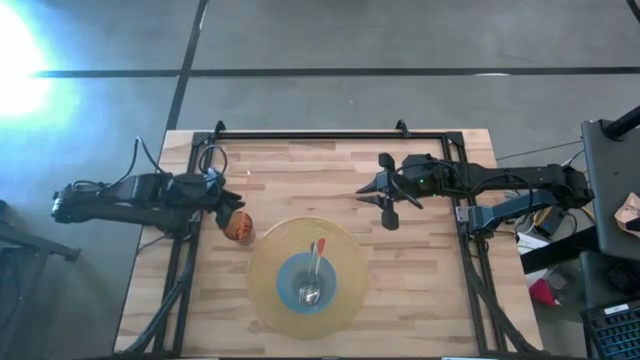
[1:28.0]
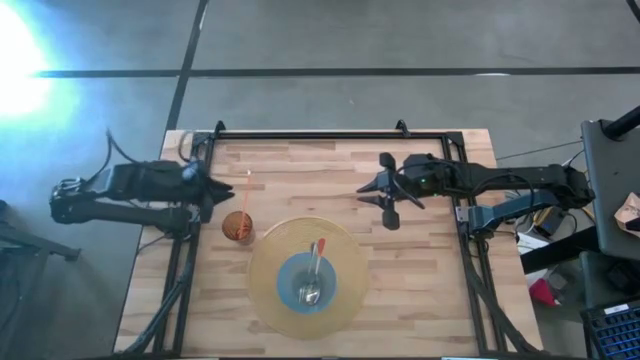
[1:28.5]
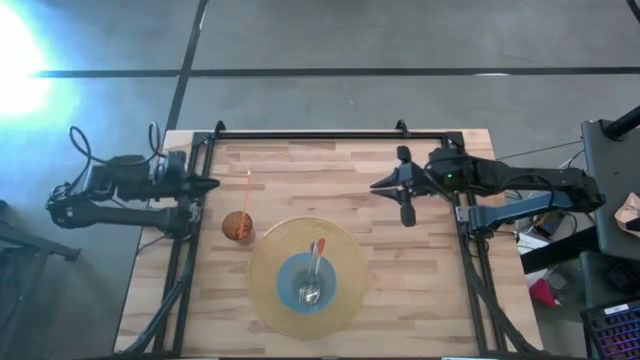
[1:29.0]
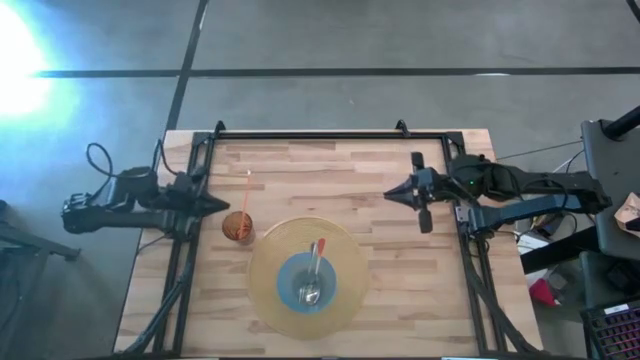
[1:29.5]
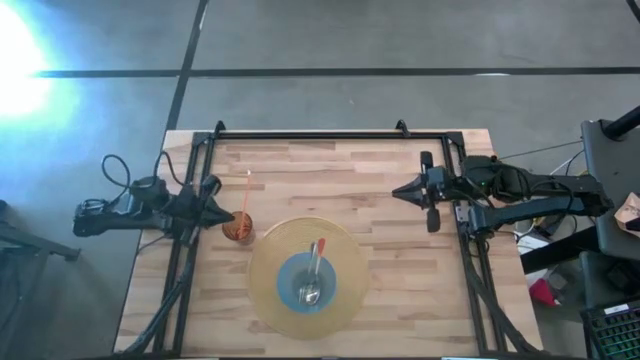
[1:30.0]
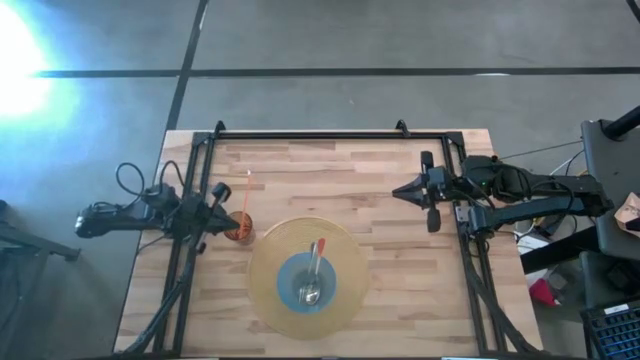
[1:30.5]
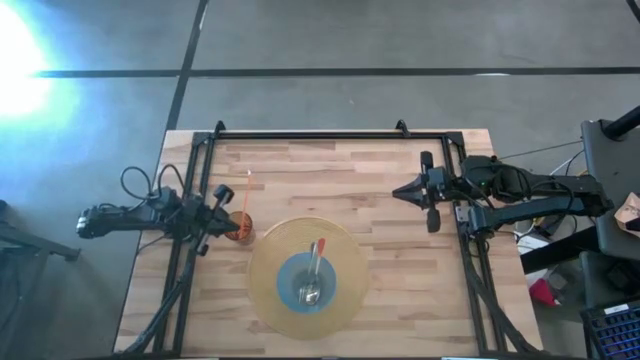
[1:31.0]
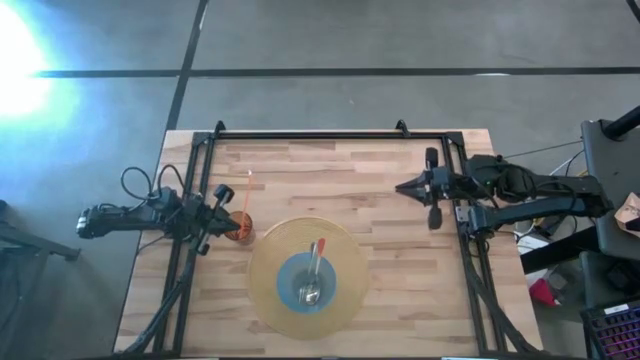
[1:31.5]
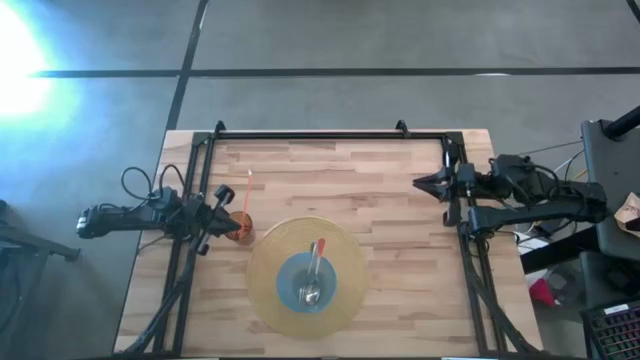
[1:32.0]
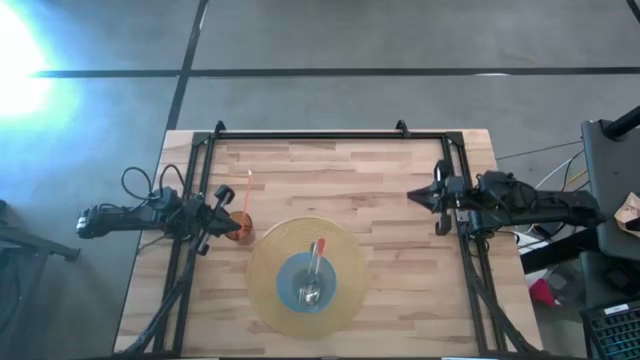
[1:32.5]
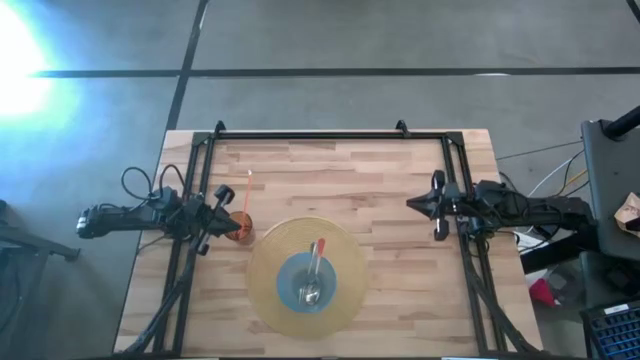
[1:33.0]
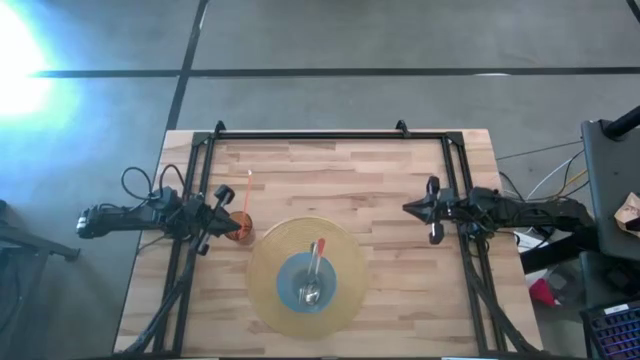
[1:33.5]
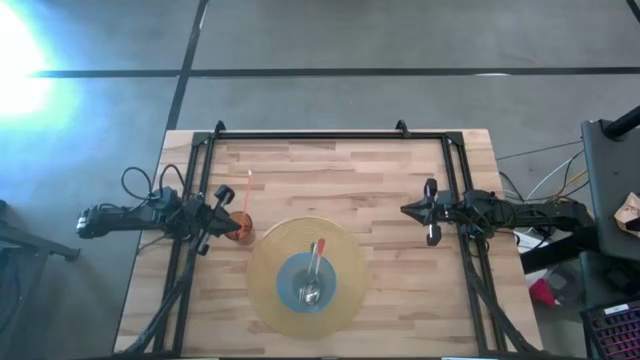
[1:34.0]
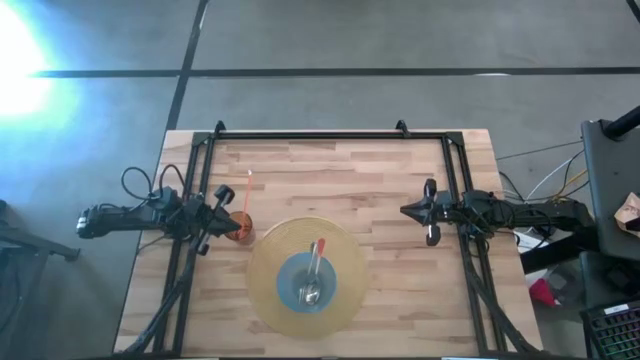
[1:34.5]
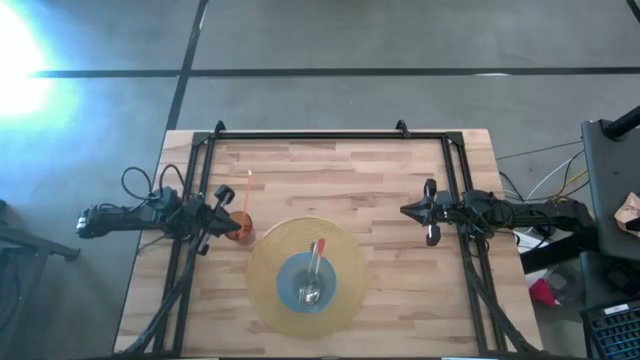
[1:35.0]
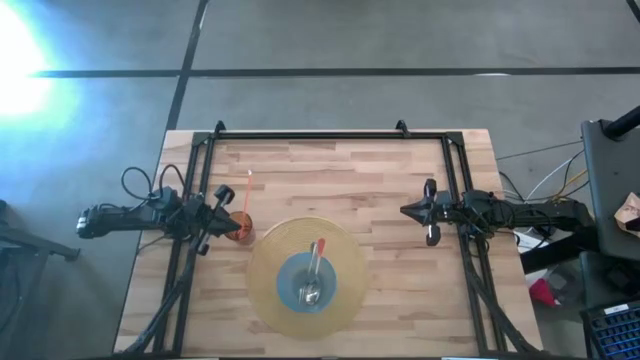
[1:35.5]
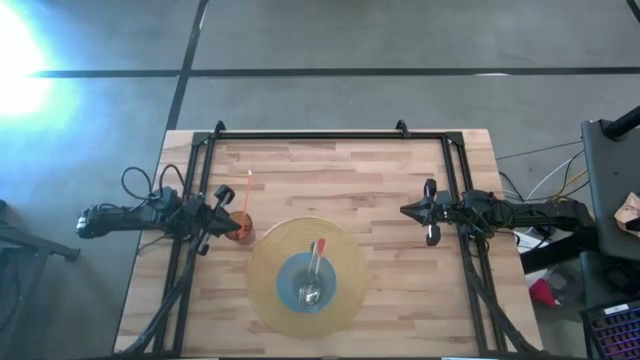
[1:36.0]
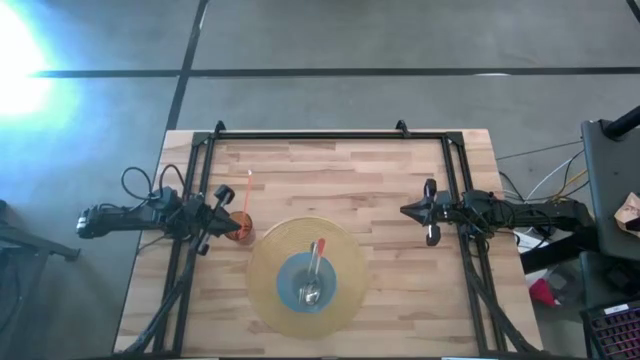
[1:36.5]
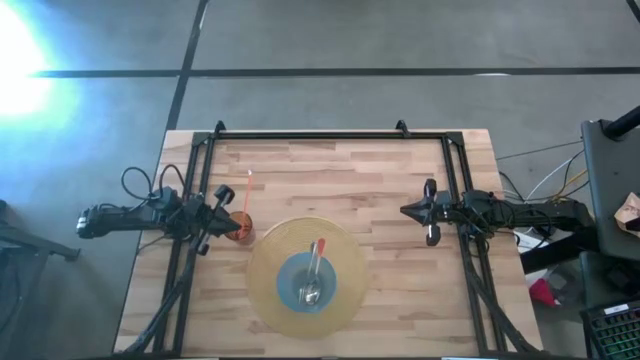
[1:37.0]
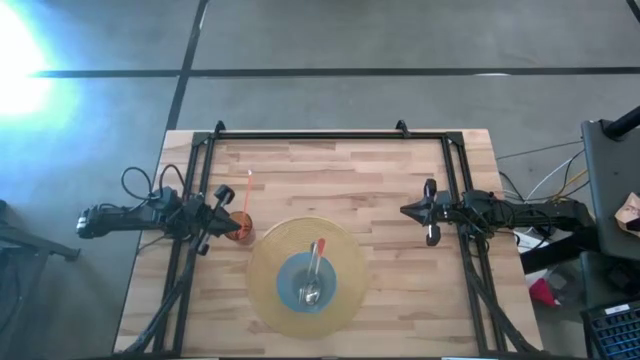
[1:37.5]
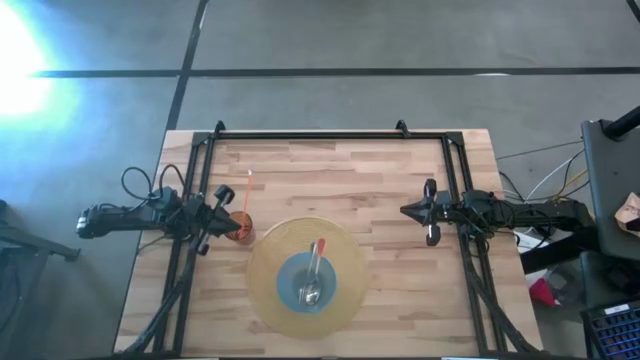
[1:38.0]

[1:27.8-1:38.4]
Task: Pick & Place Utensil
Return to Home Position

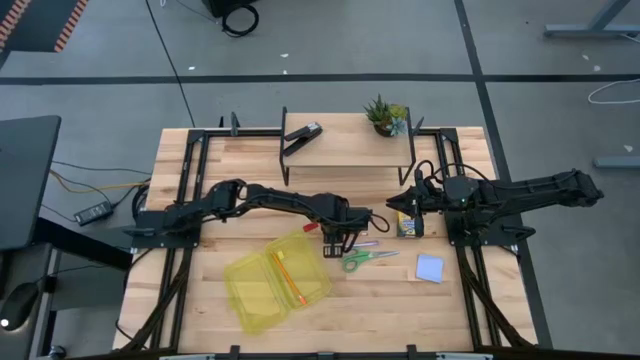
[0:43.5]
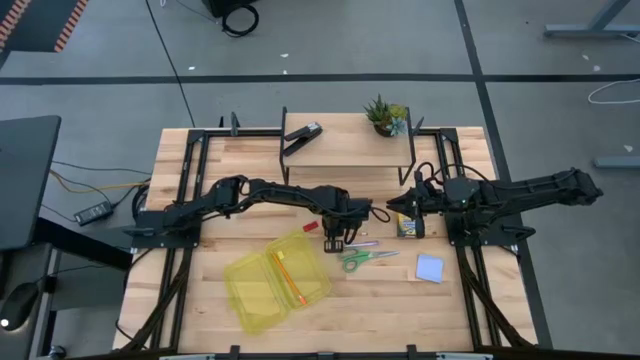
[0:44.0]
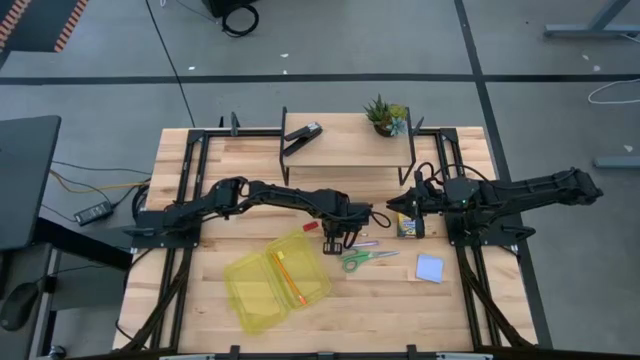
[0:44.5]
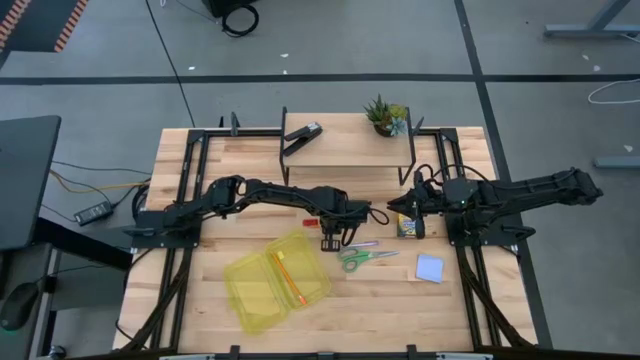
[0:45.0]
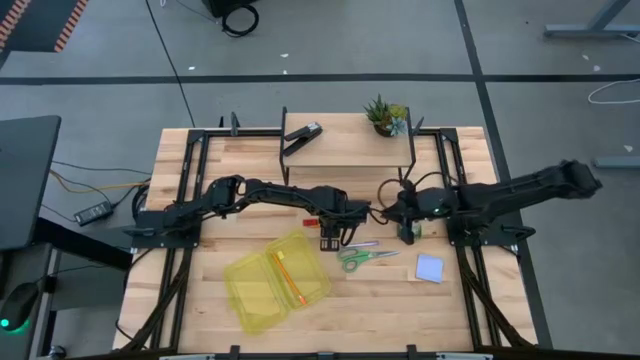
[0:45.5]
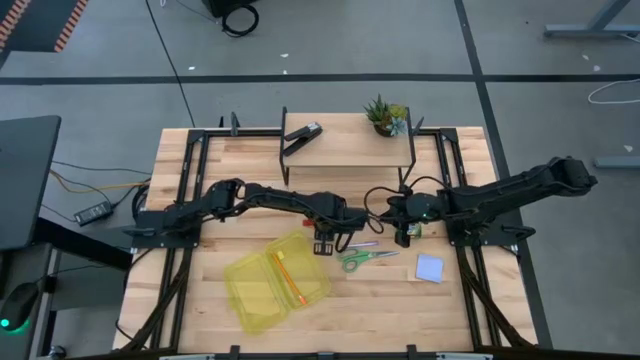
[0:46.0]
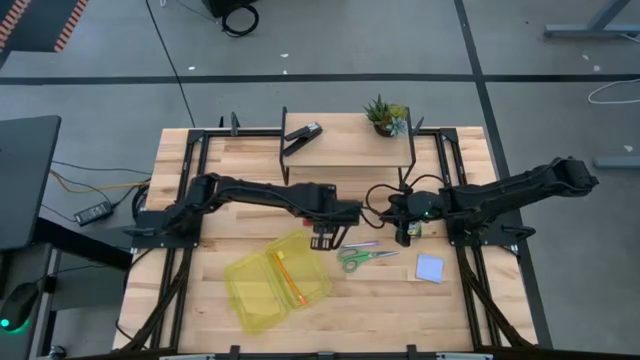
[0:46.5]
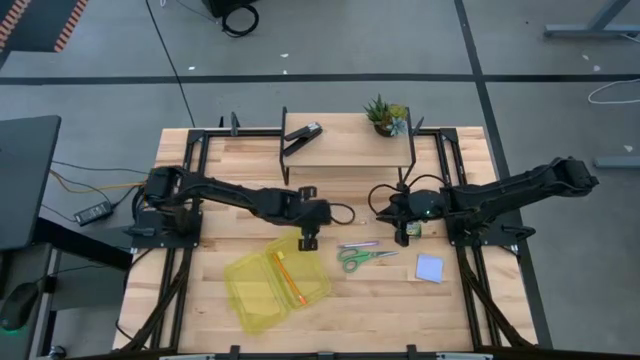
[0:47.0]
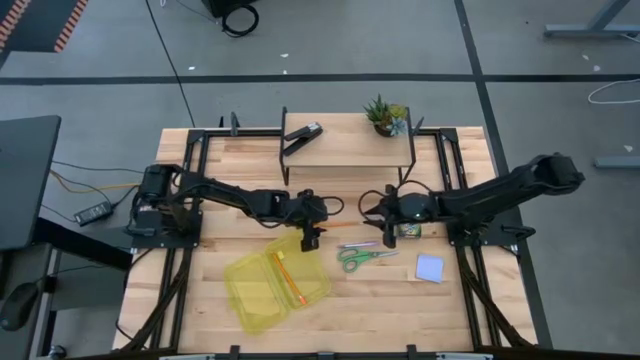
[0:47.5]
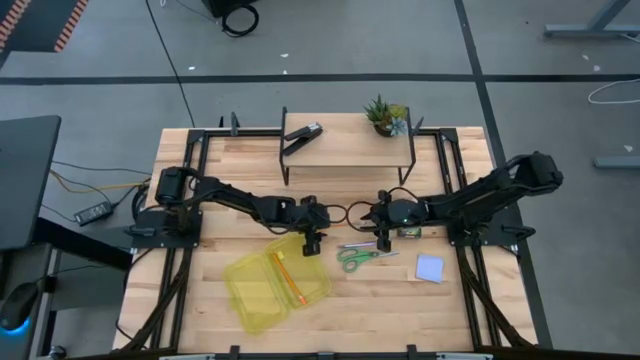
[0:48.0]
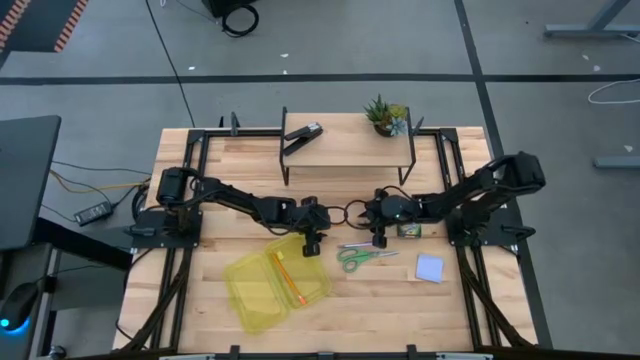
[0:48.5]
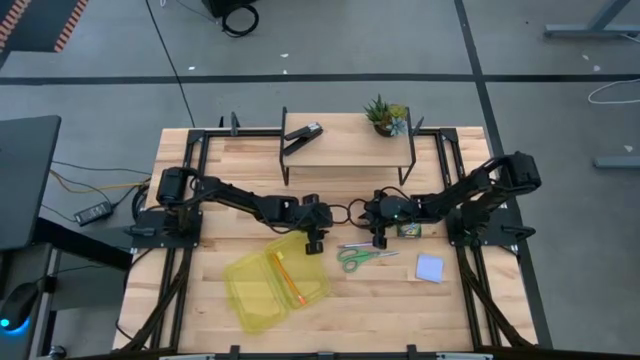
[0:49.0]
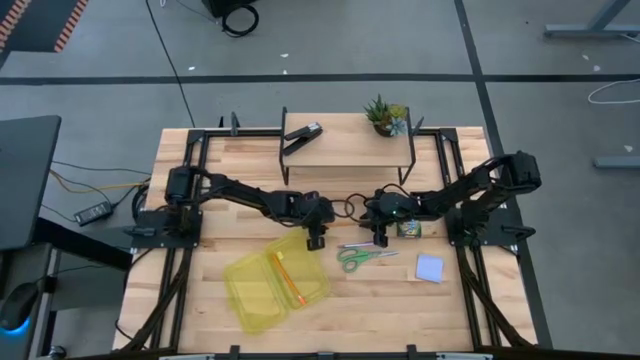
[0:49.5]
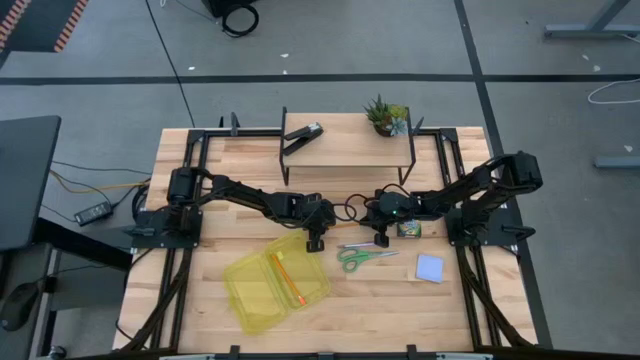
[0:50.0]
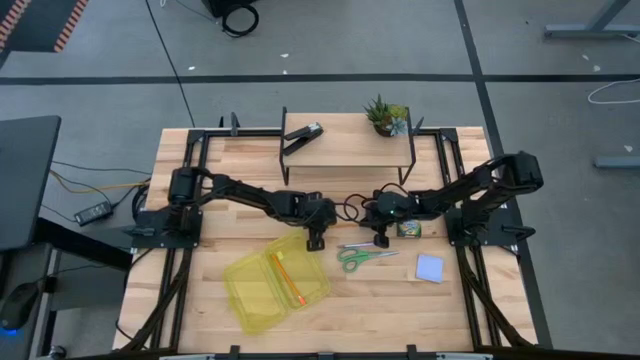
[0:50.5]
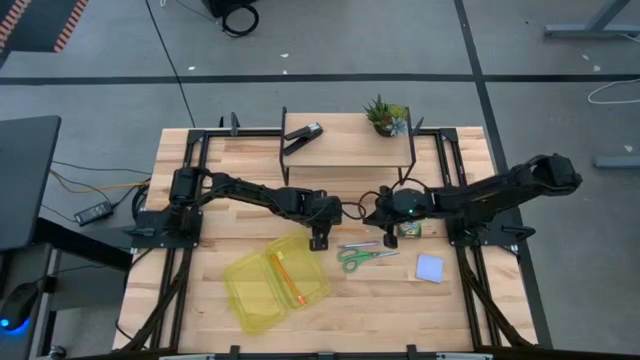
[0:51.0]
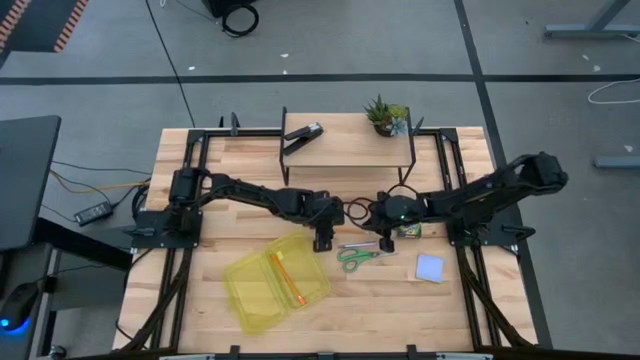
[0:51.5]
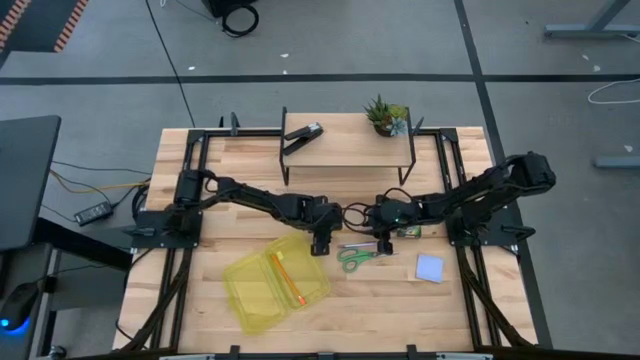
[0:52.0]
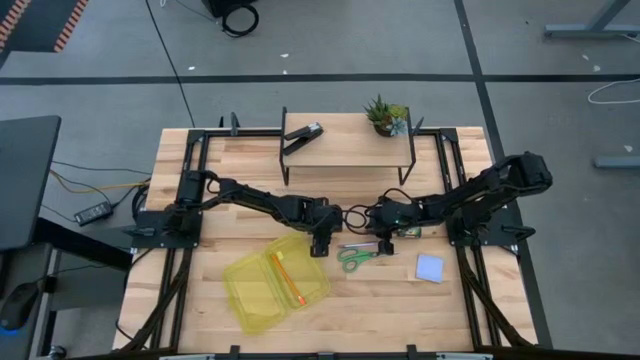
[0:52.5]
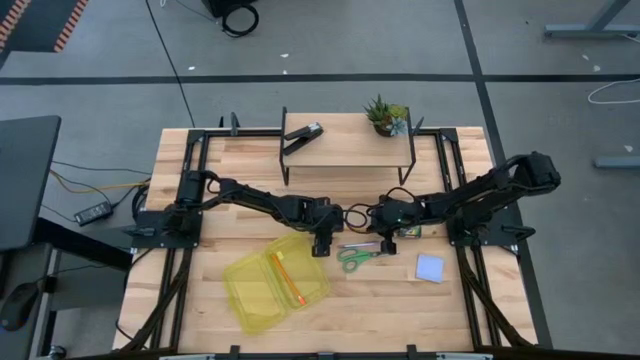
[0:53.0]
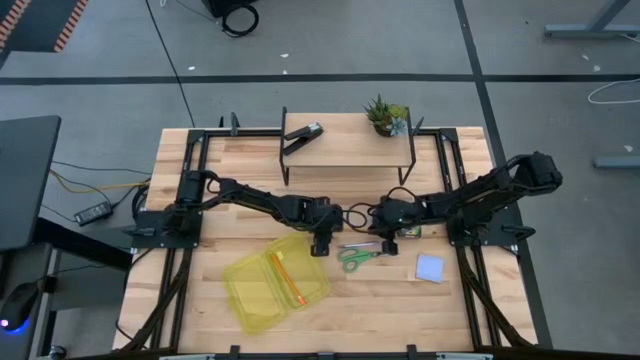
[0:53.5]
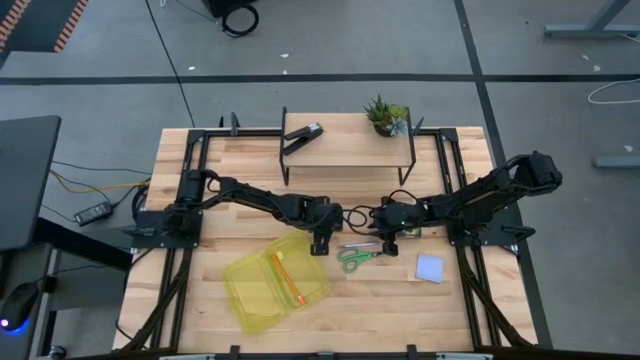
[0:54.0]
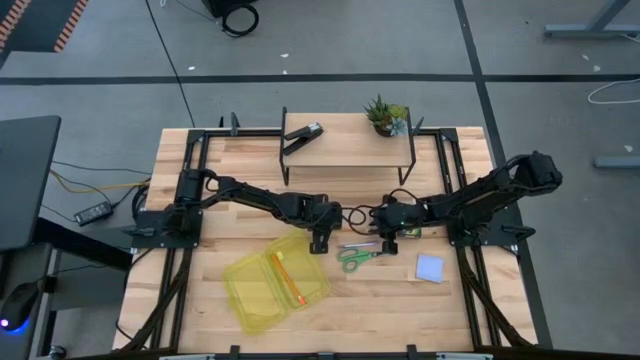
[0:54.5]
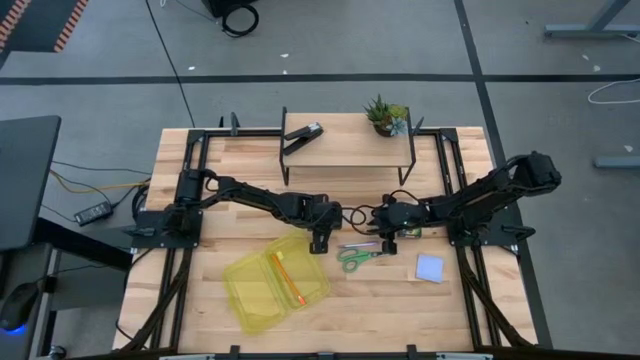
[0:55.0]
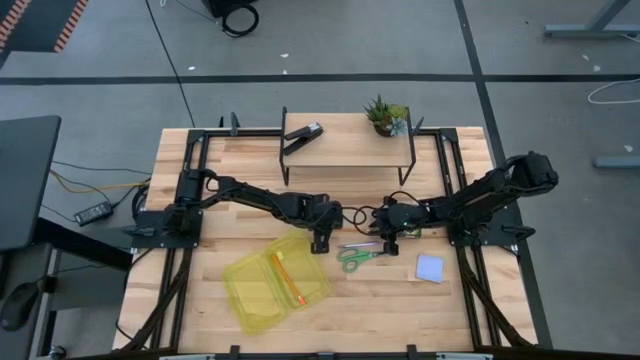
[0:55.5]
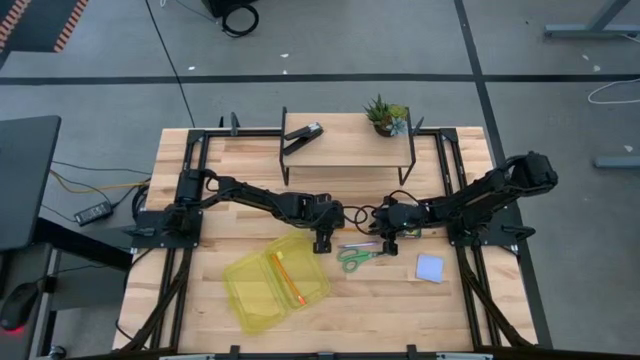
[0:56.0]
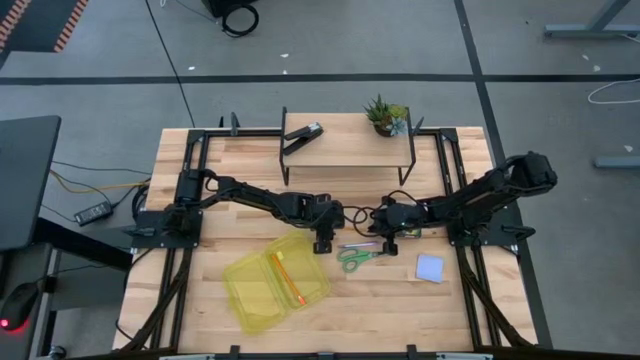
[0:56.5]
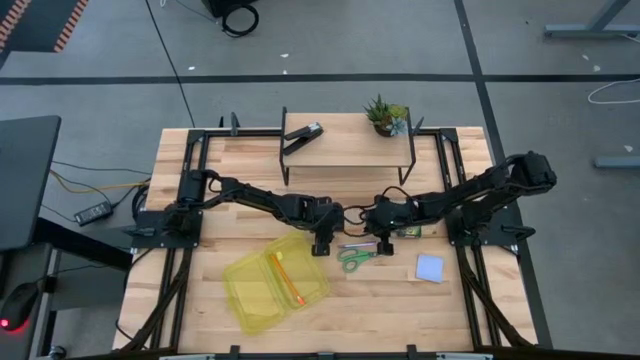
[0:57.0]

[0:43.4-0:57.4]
Task: Pack school essentials
Put the orange pencil into the supply box
